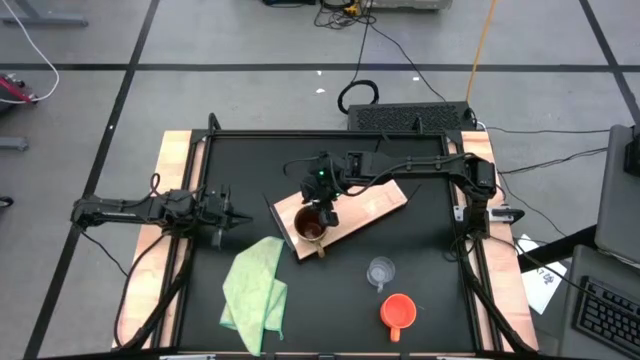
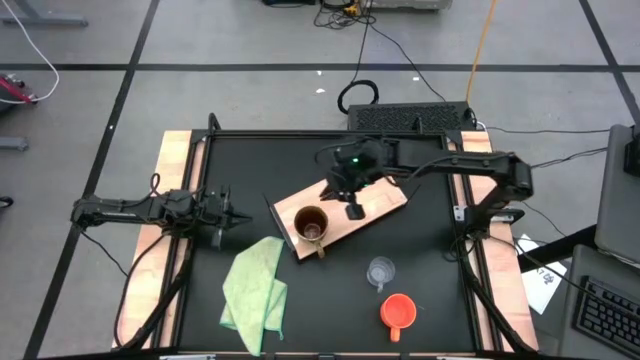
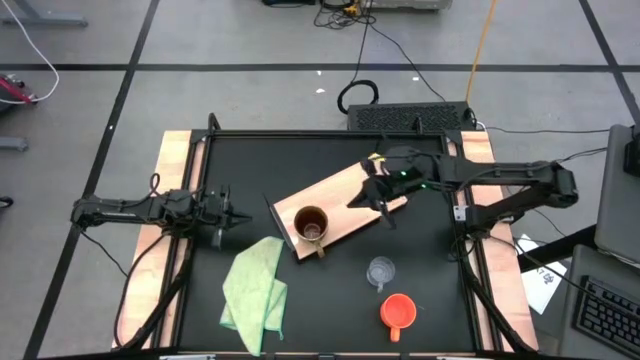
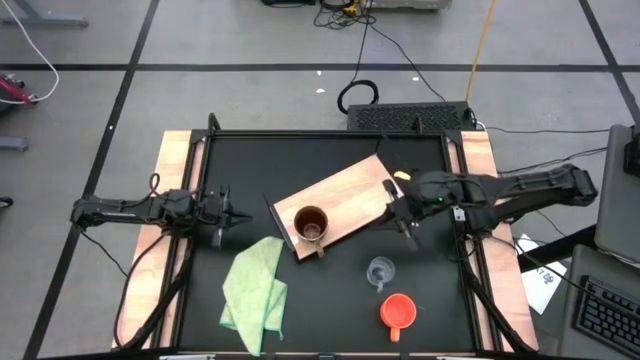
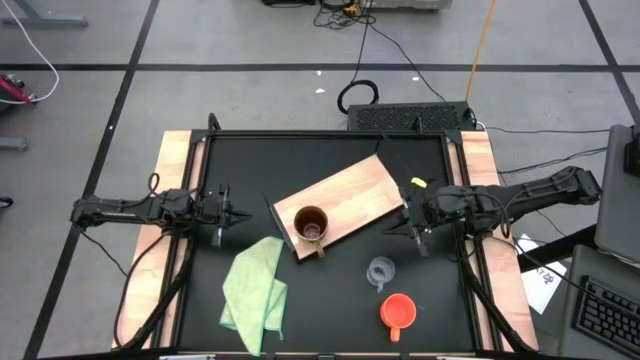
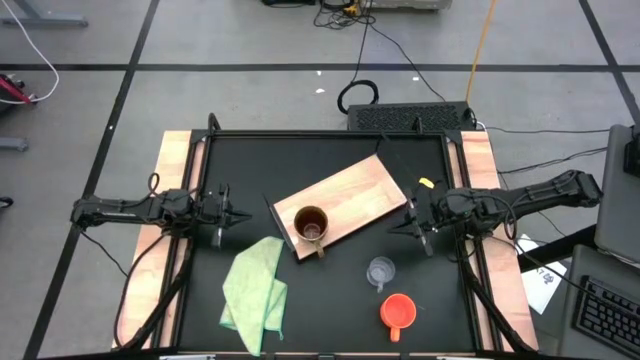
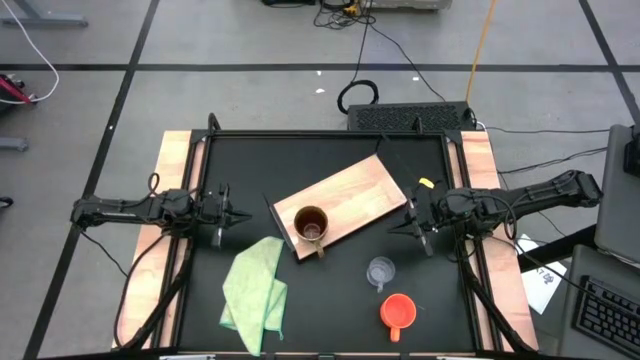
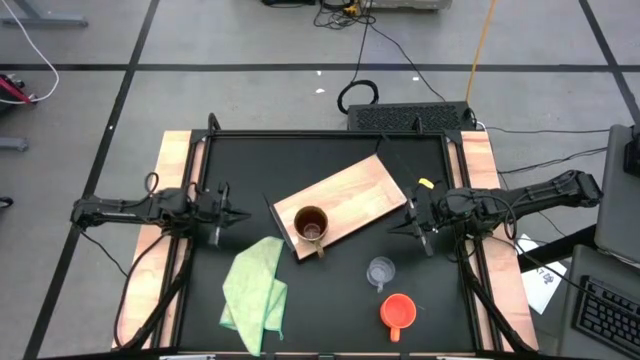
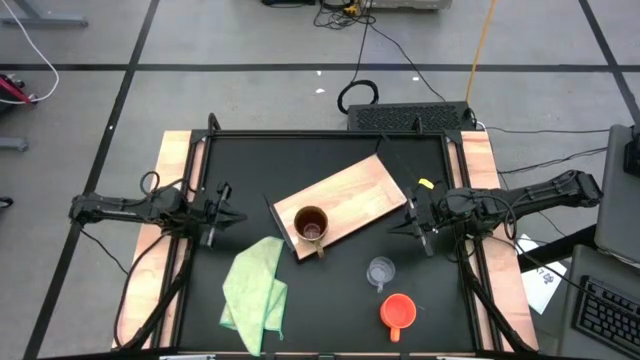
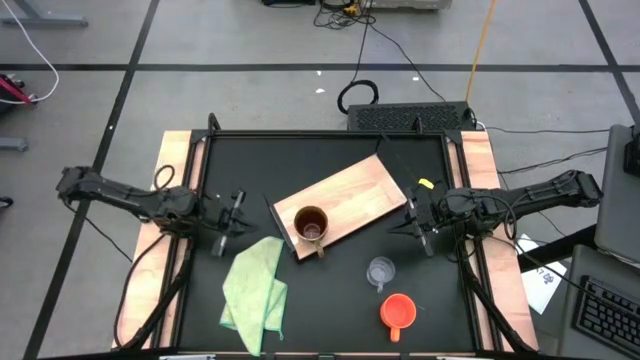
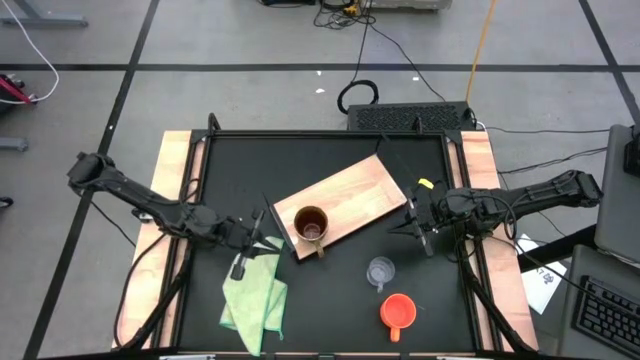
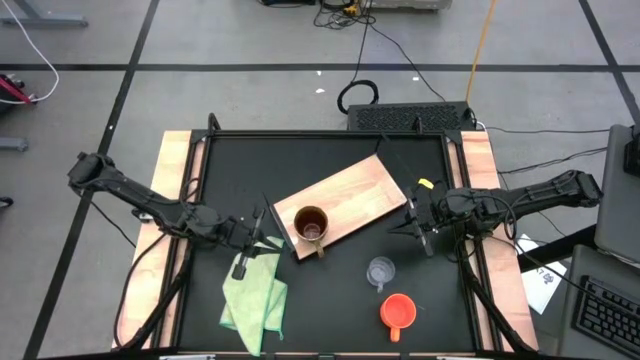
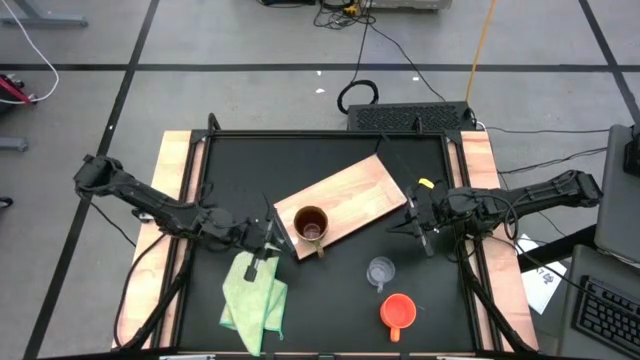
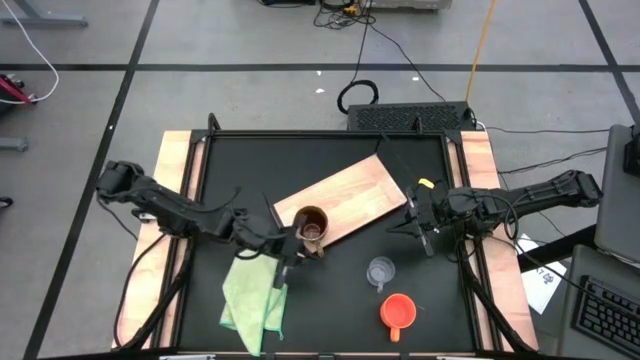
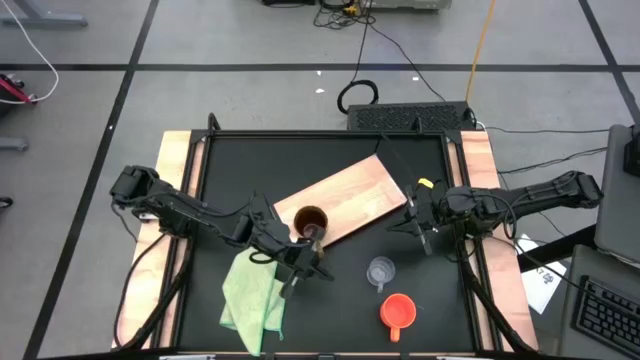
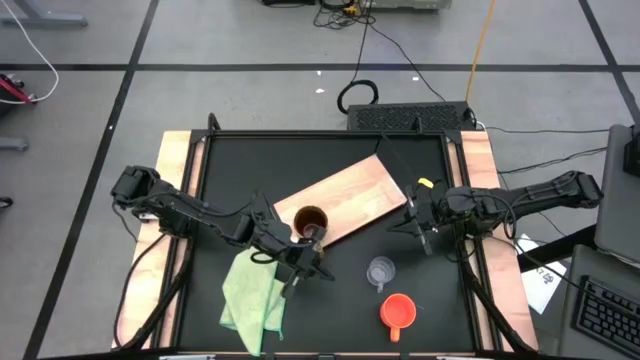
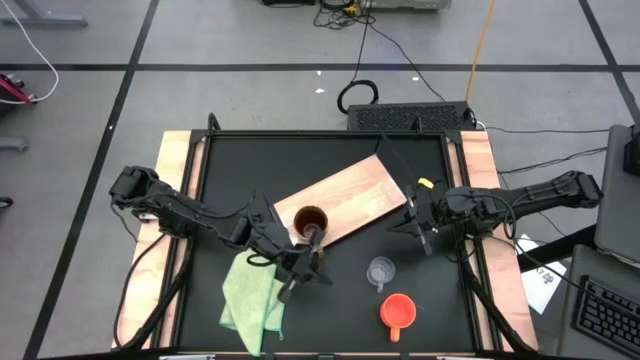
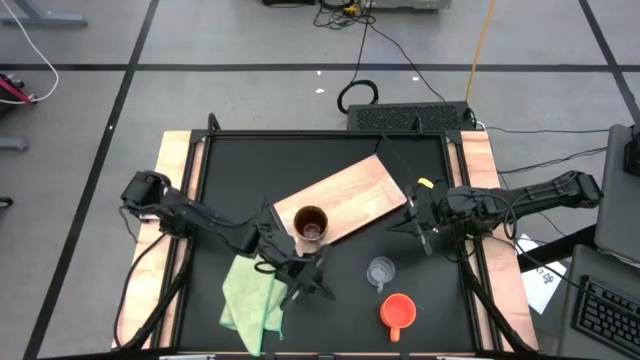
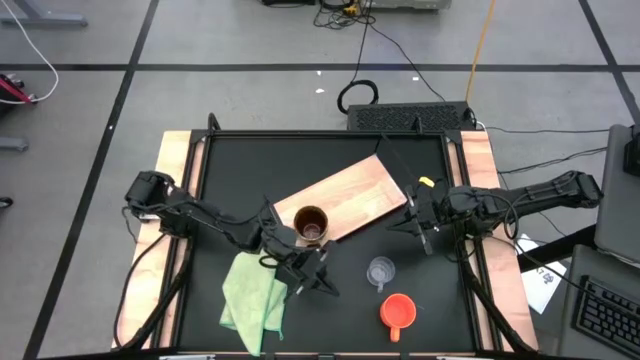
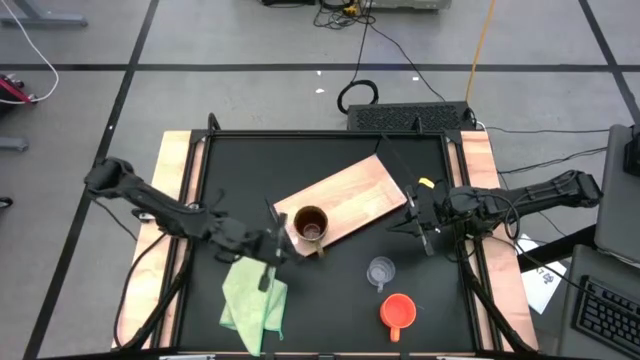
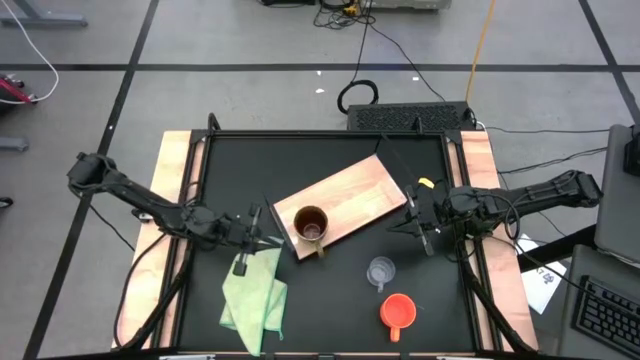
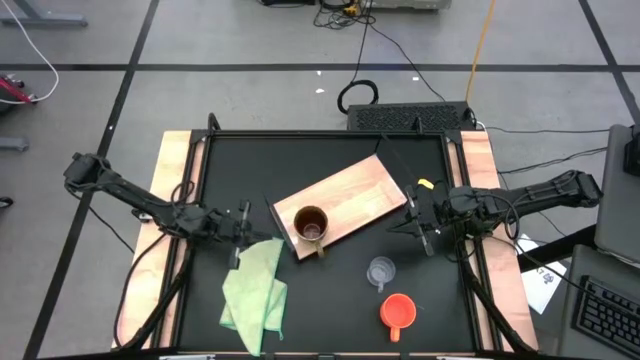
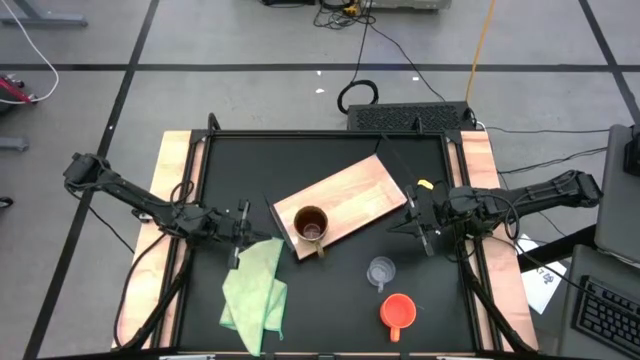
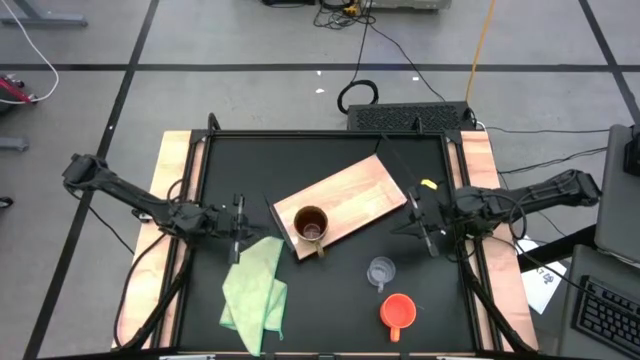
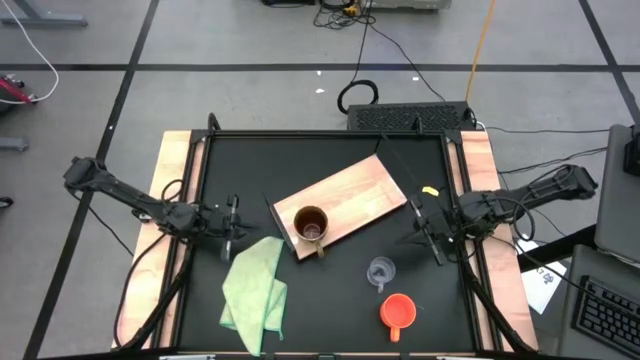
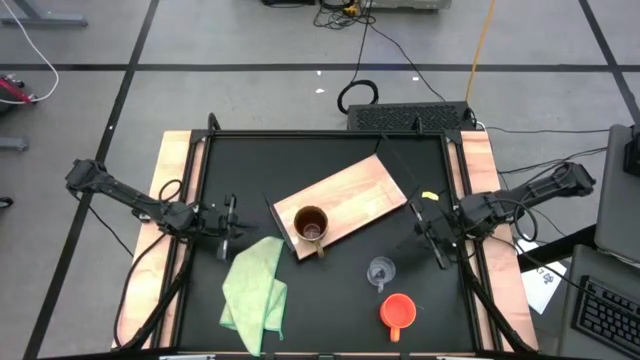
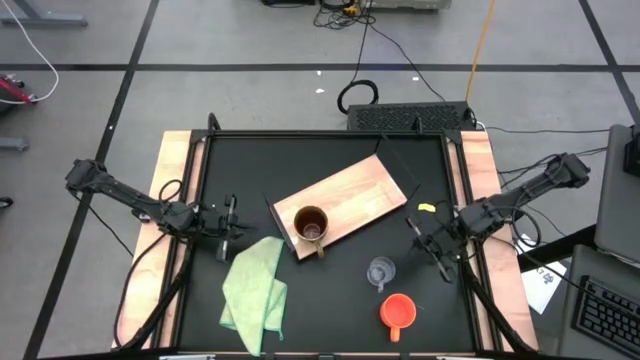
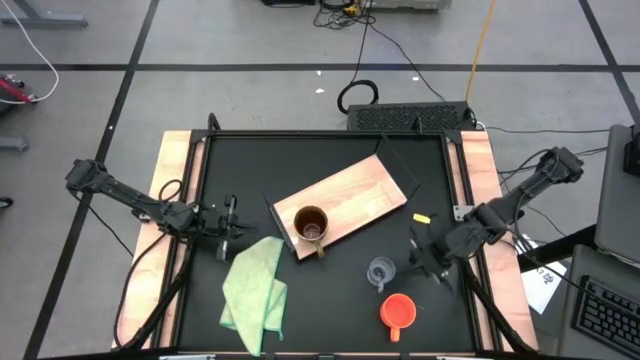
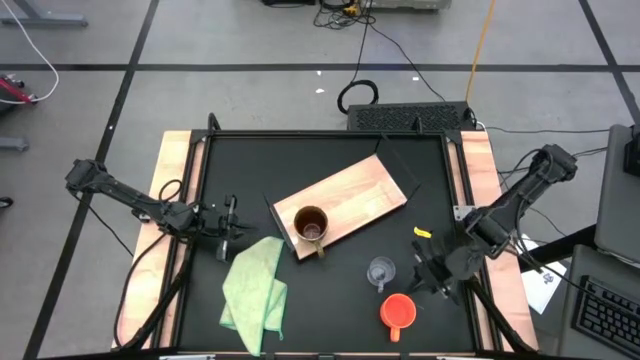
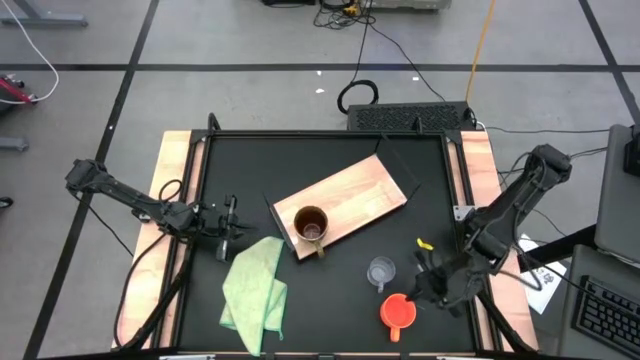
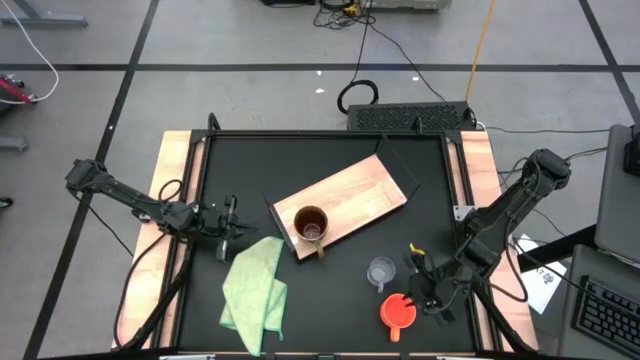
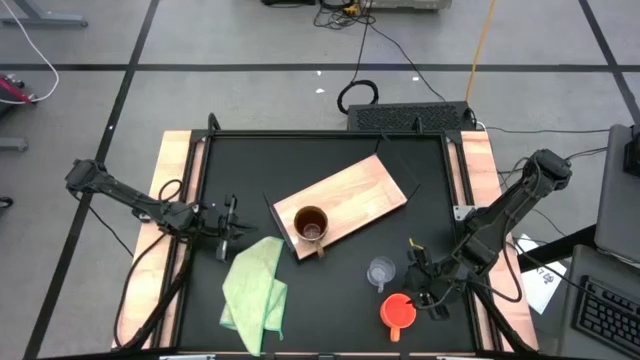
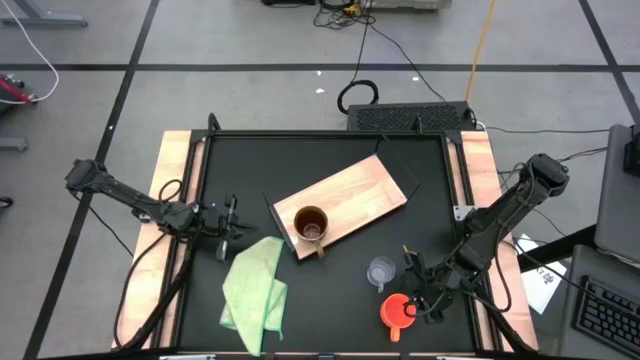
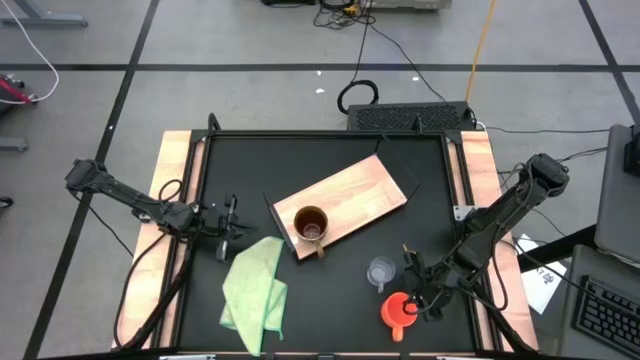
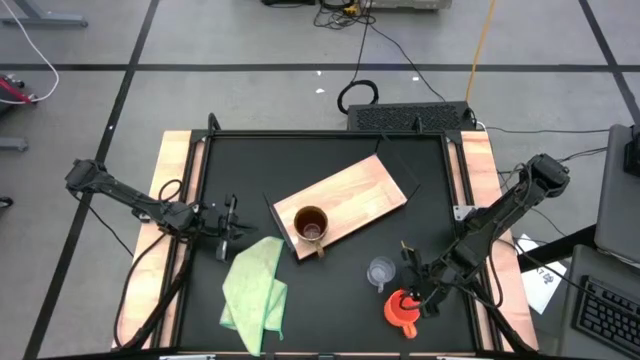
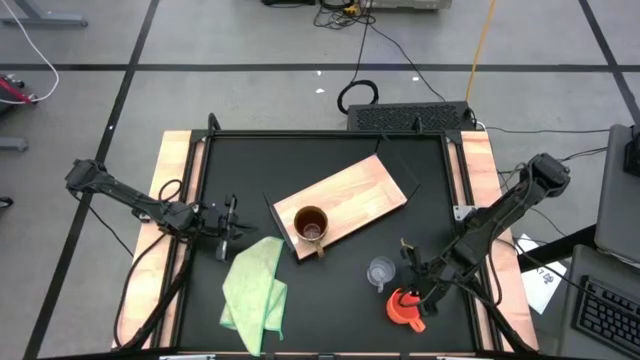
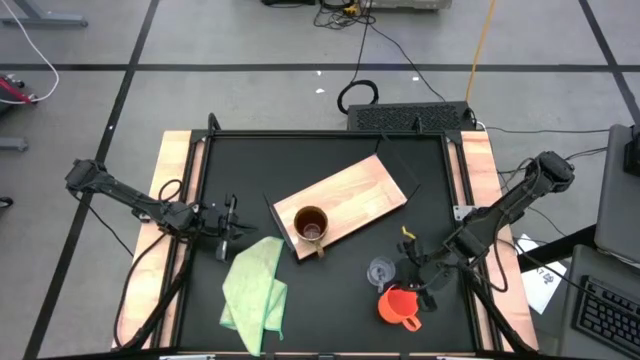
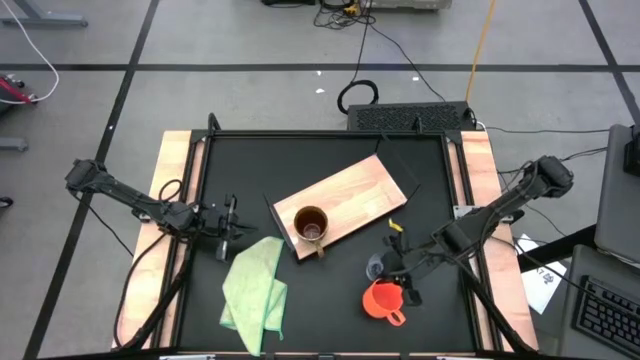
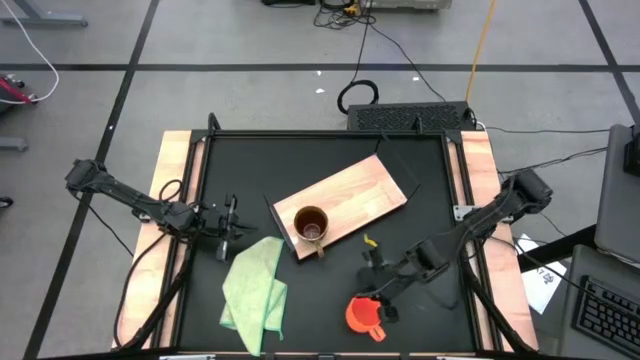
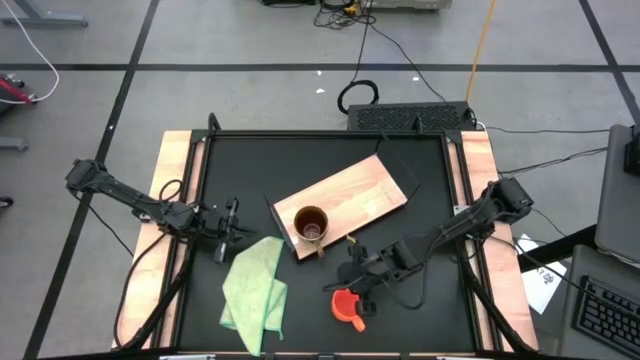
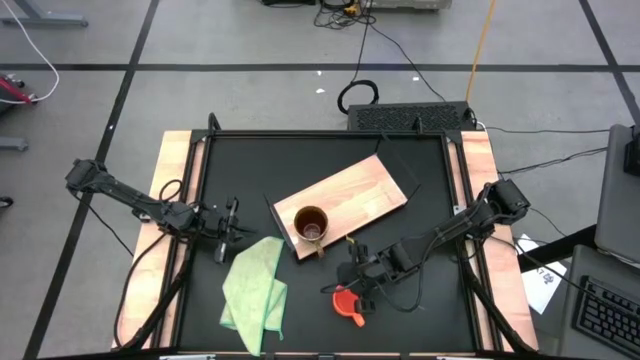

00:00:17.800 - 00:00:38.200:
Task: Stack small to large cups/mugs on shelf
Put the orange mug on the shelf

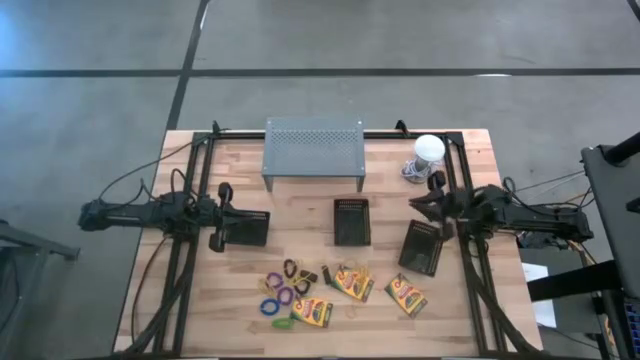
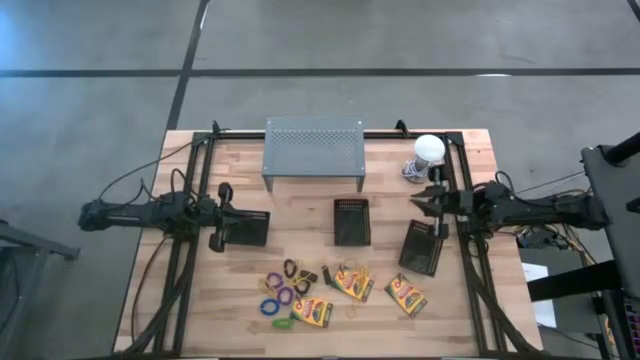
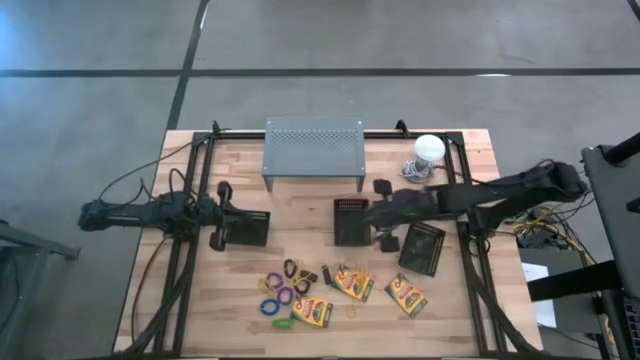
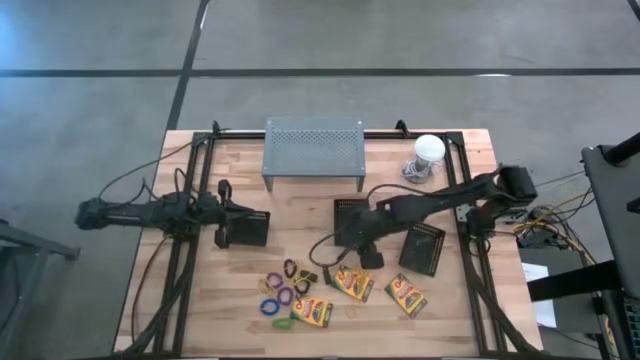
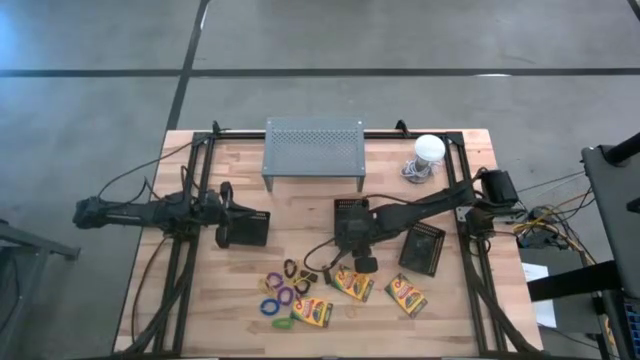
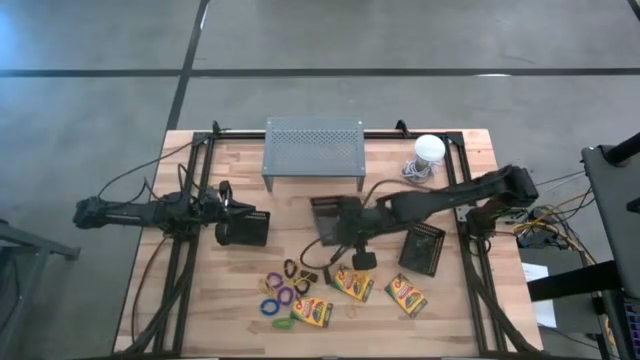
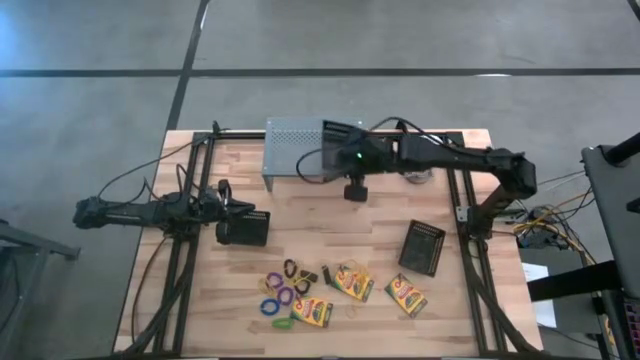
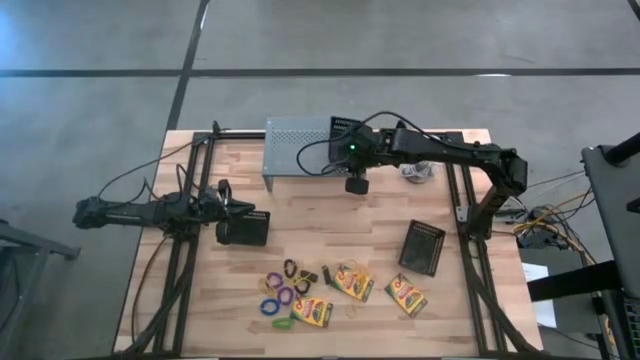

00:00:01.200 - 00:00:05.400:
Task: Pick & Place Office Desk Supplies
Put the black basket on the shelf
